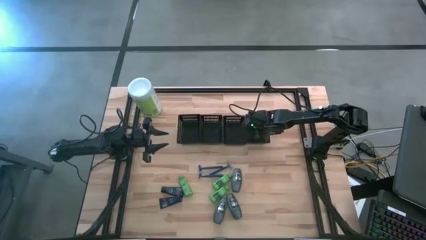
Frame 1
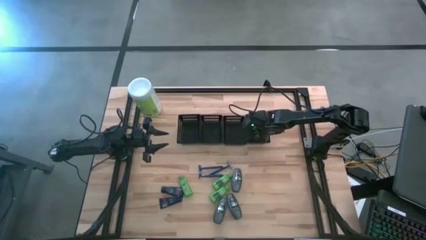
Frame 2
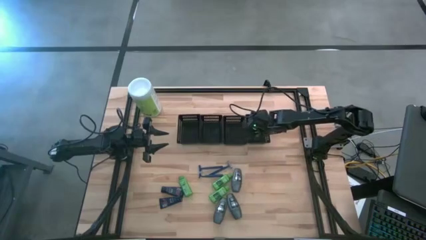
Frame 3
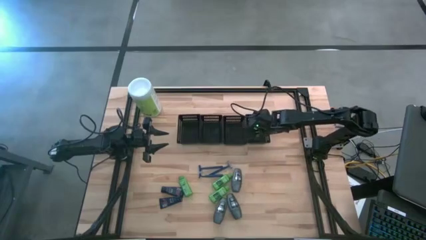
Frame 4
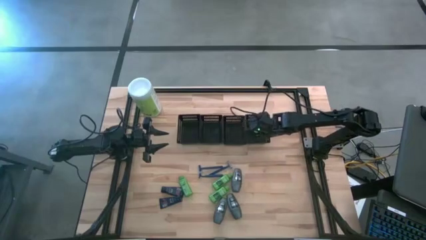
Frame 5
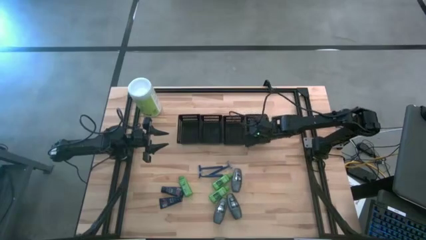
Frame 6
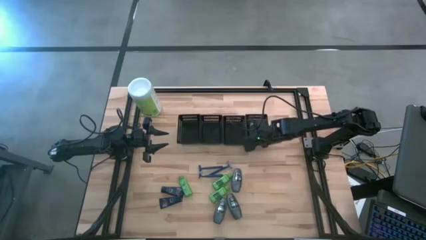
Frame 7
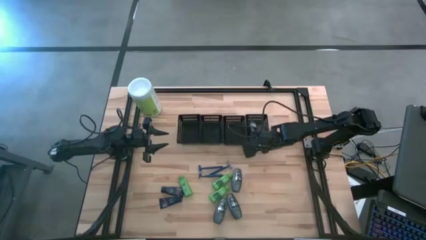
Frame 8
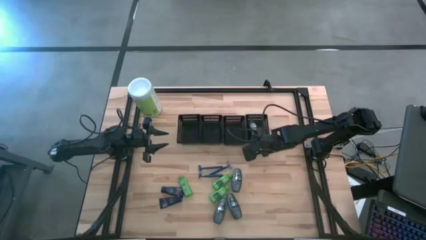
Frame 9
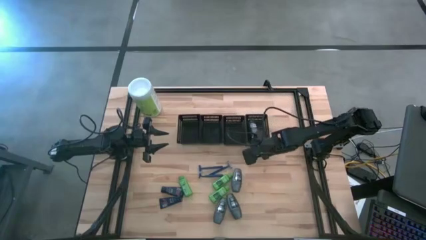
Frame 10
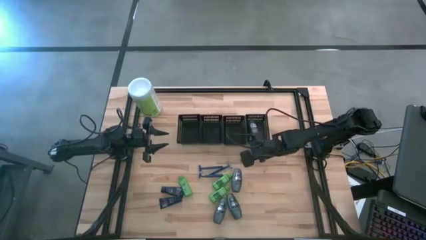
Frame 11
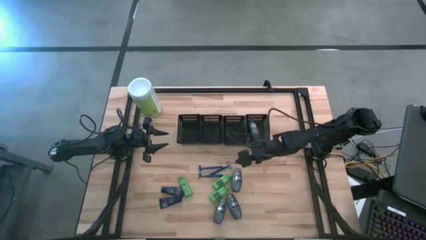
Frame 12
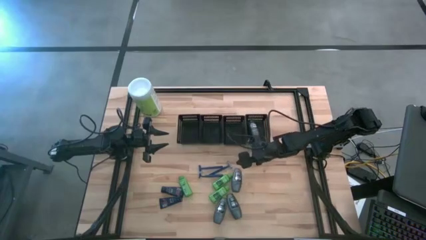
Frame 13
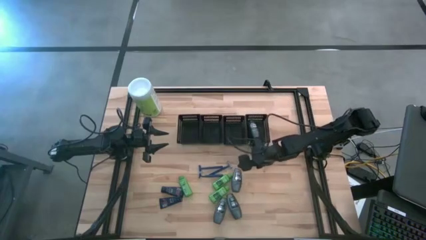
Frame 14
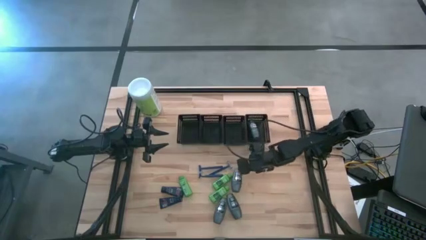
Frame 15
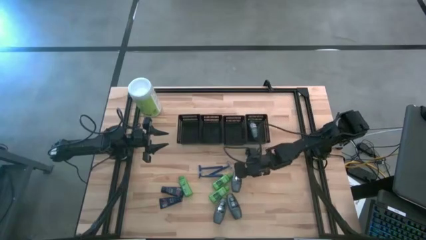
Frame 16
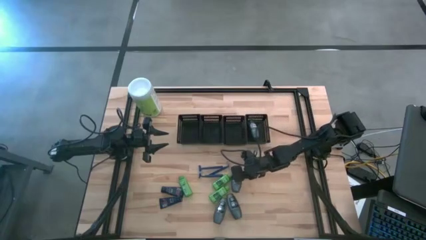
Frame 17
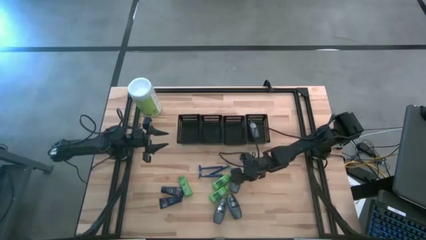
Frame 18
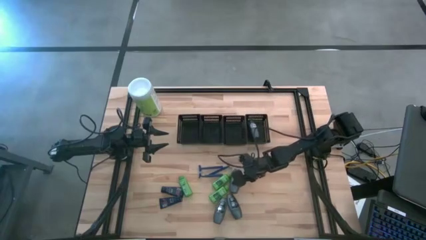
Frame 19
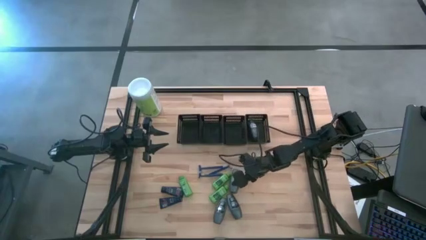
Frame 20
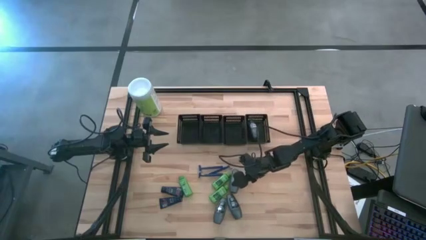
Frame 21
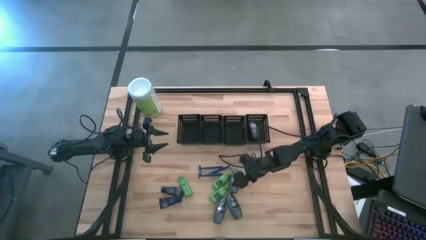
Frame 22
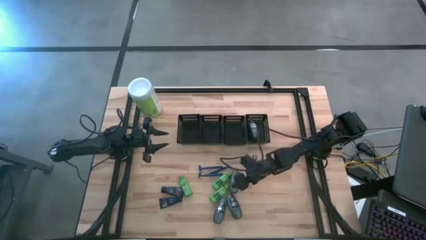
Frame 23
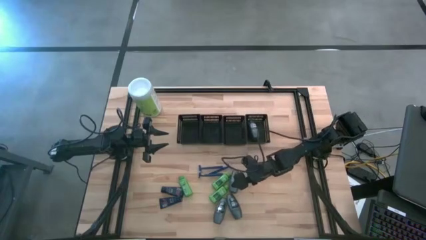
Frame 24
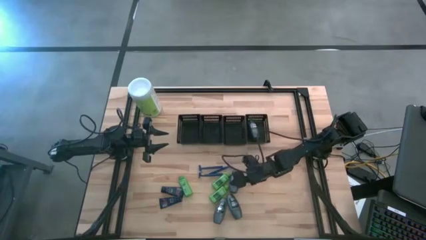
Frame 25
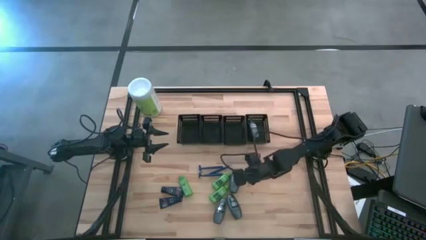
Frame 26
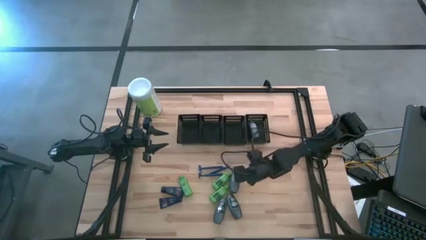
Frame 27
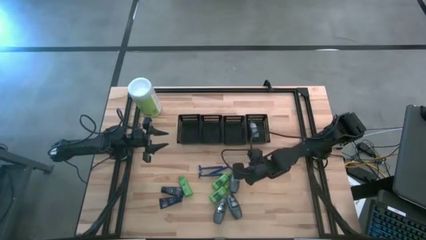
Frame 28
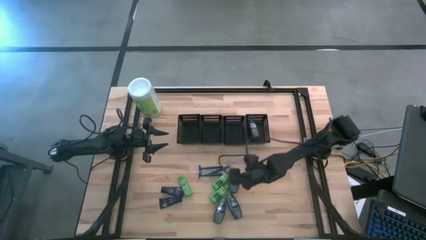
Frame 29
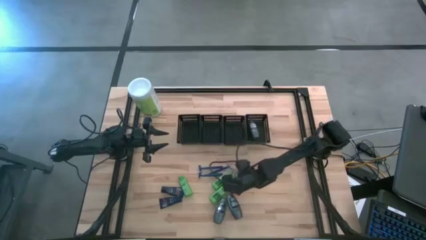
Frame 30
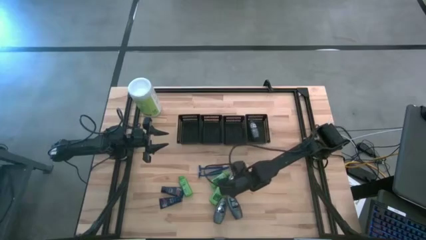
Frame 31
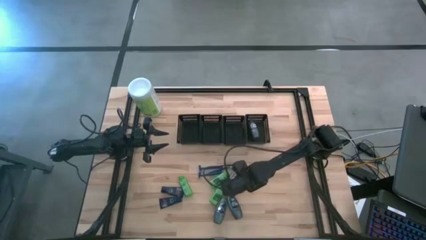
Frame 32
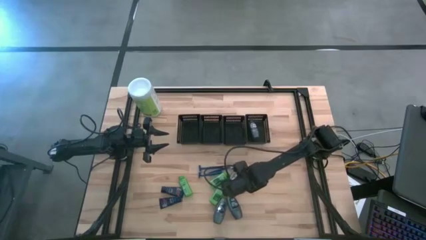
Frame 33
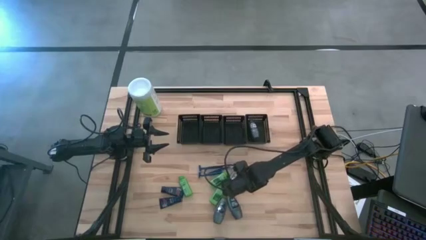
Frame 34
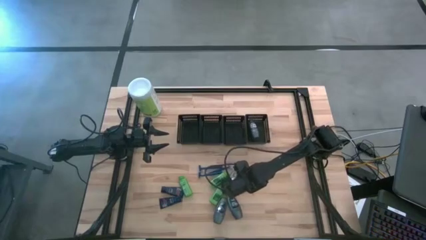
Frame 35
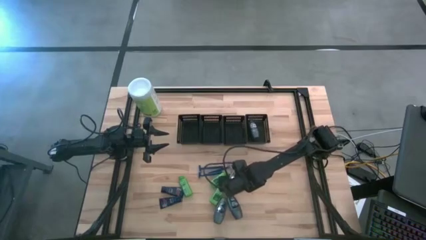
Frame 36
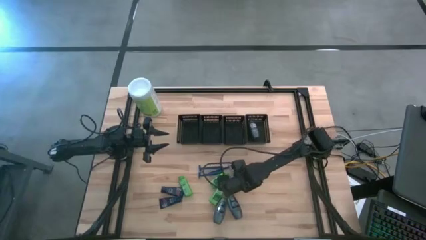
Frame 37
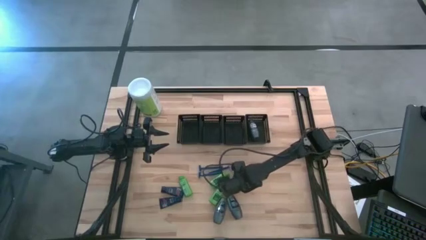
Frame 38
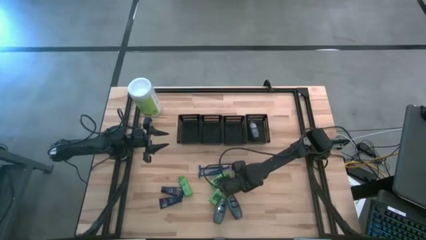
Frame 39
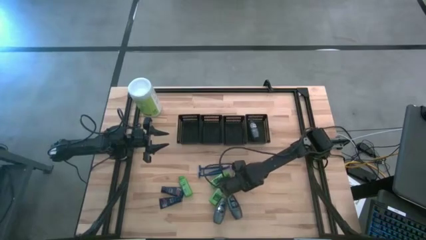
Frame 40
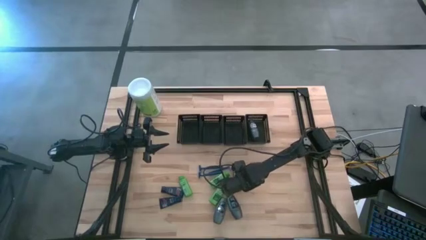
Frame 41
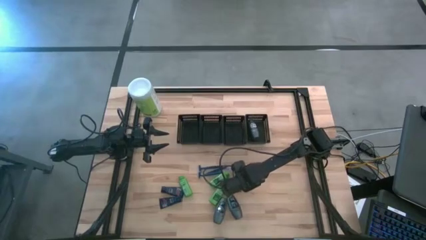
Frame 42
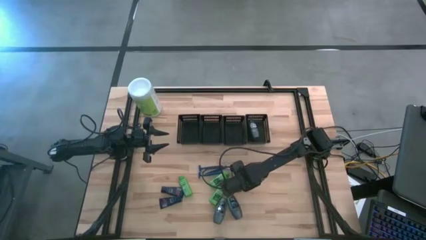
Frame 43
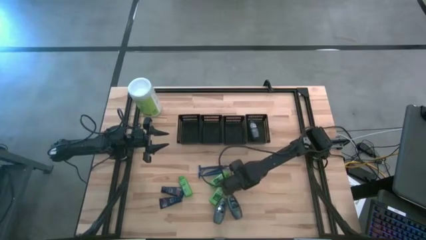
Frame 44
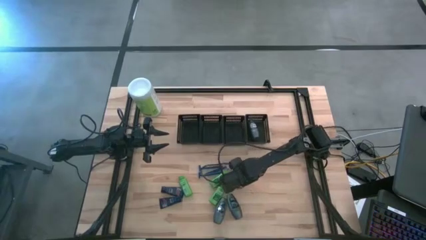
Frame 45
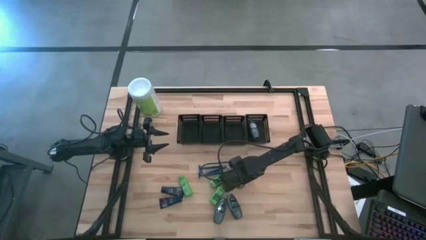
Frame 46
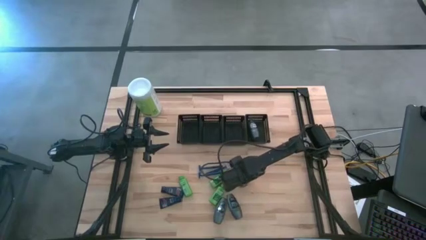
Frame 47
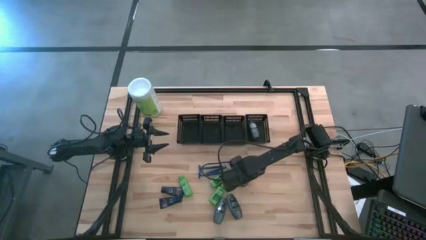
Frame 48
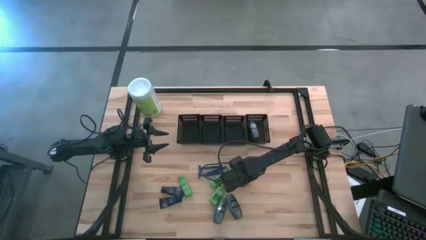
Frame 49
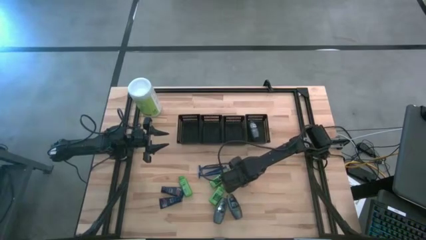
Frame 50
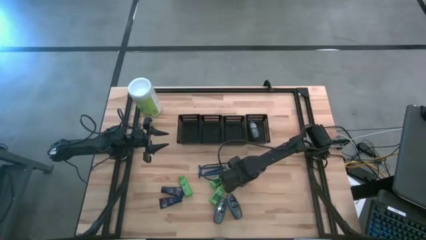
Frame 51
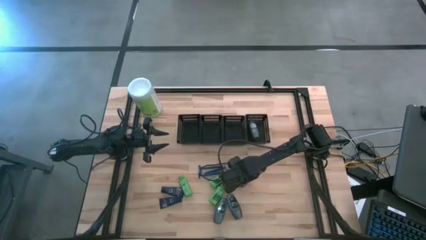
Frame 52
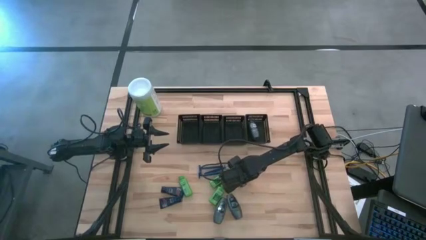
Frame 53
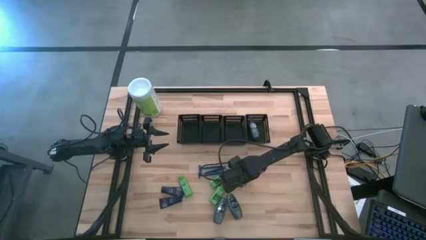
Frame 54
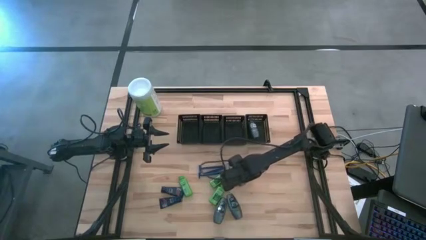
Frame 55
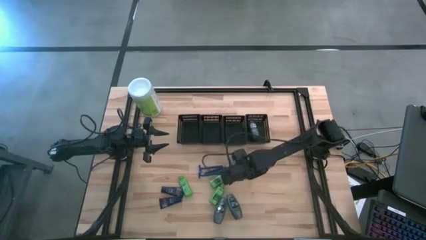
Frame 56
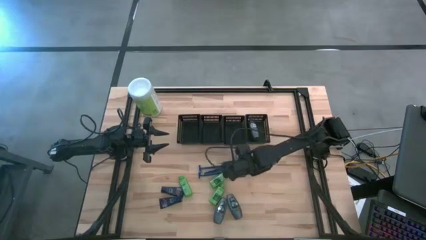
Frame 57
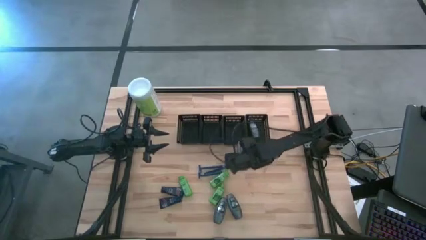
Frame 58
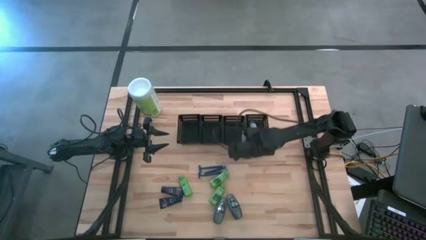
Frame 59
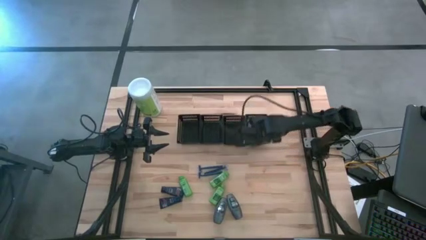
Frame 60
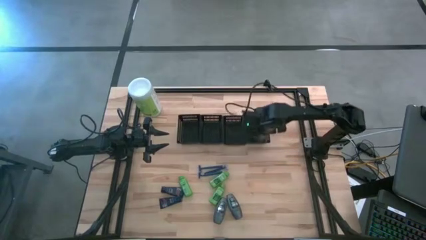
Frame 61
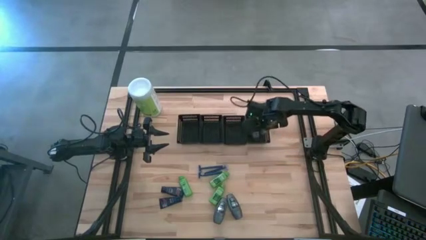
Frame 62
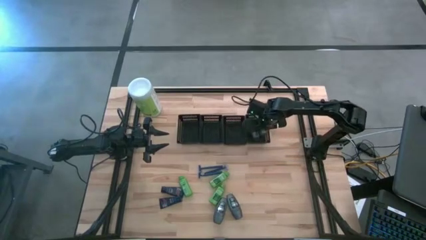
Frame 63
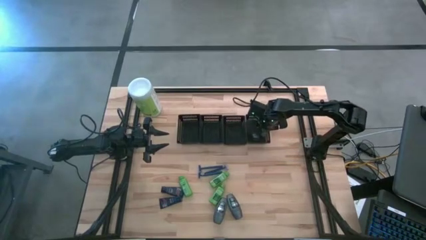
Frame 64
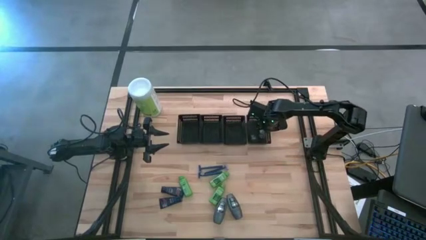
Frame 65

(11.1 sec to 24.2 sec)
Task: Pick & Place Travel size toiletries
Put the gray deodorant into the right black bin

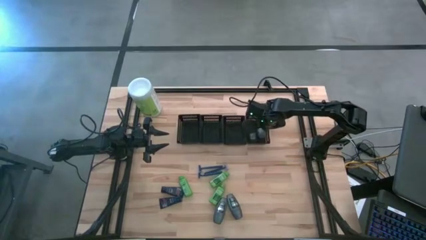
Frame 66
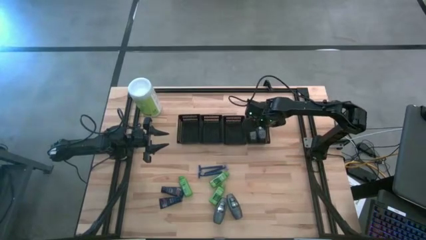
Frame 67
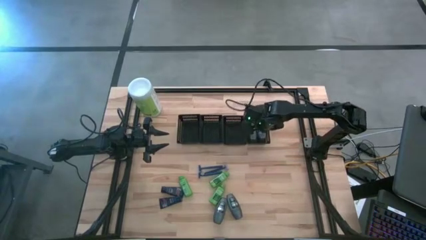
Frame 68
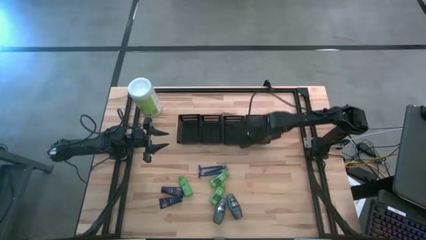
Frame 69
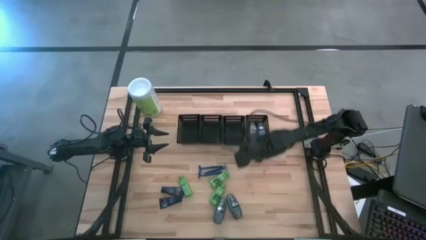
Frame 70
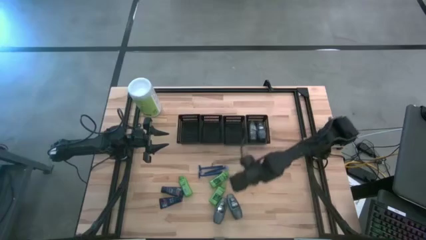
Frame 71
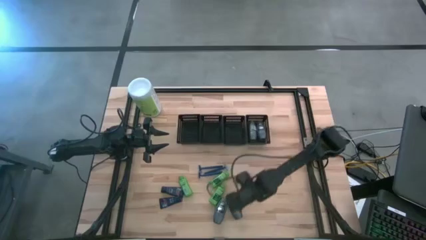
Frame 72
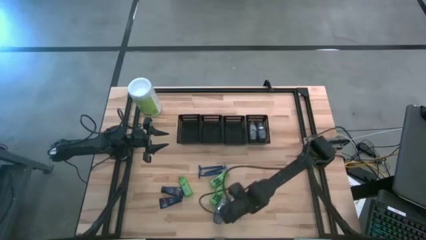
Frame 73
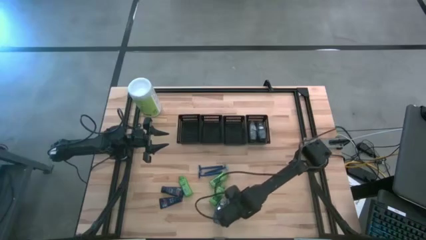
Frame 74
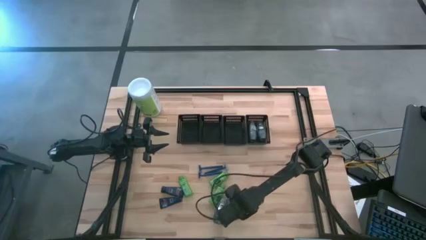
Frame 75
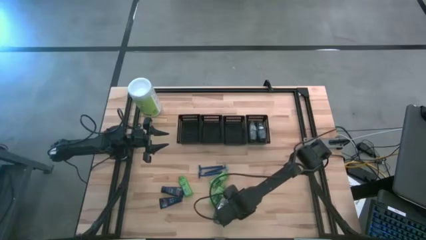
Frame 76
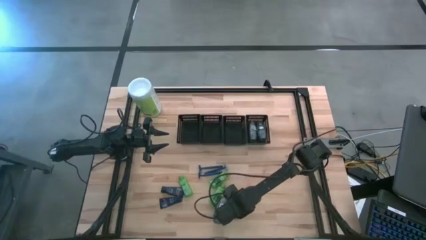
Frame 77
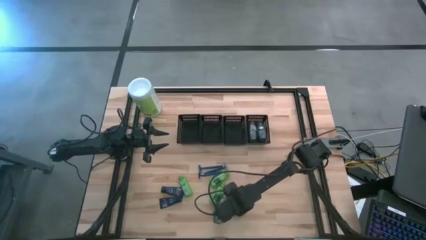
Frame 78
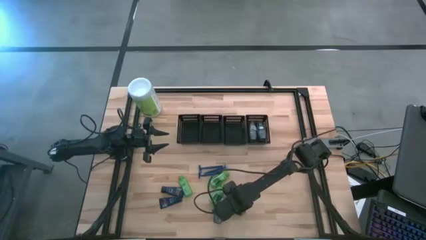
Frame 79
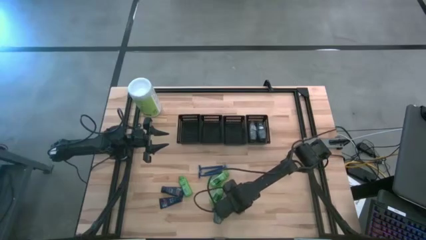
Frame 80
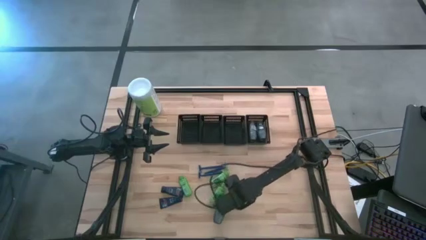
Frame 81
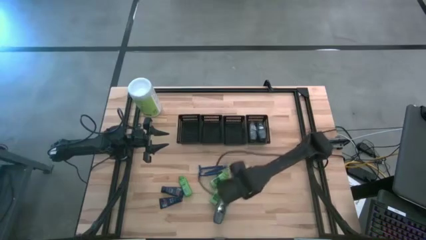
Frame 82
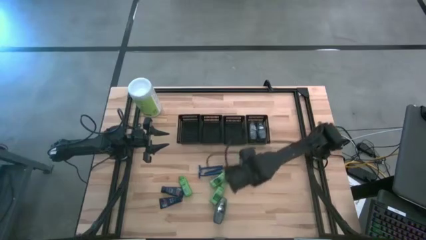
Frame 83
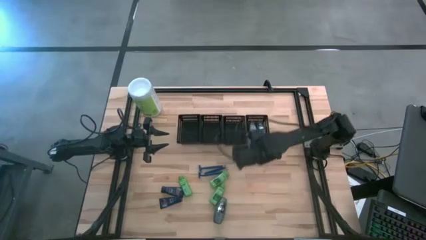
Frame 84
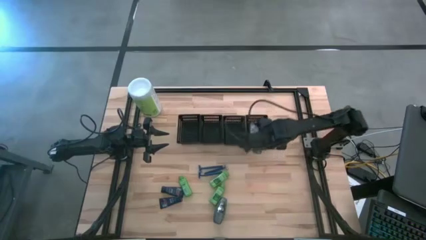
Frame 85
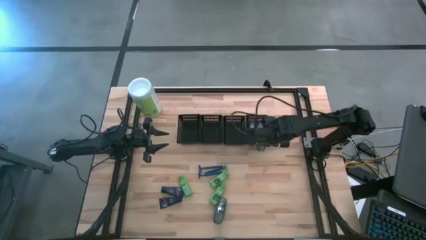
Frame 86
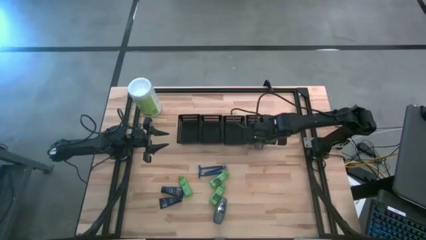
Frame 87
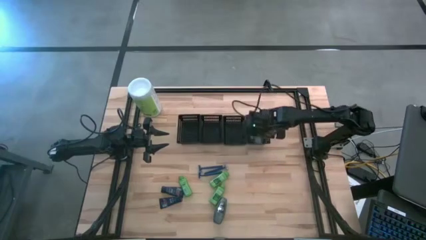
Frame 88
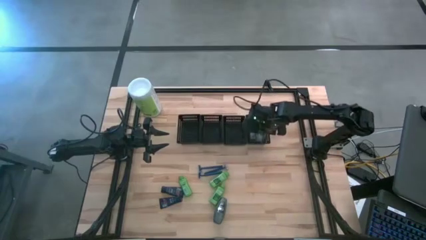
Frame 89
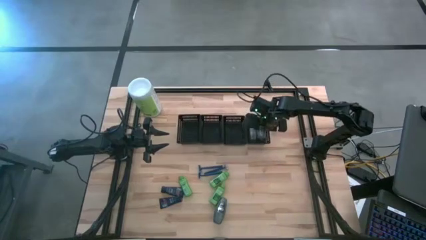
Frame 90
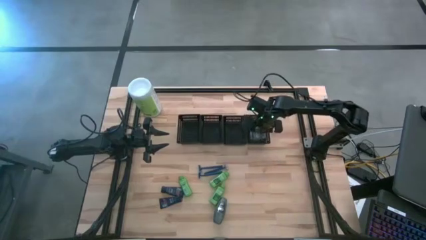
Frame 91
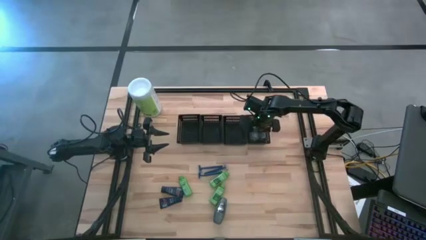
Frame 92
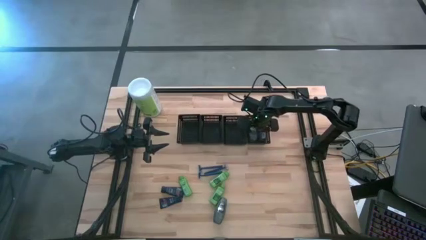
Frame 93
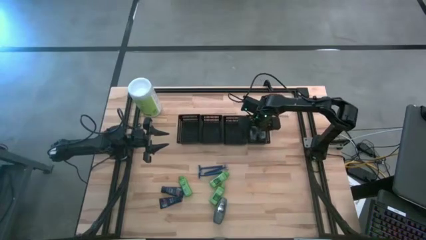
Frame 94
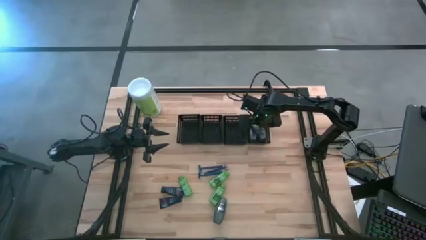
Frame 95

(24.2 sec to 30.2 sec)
Put the gray deodorant into the right black bin
